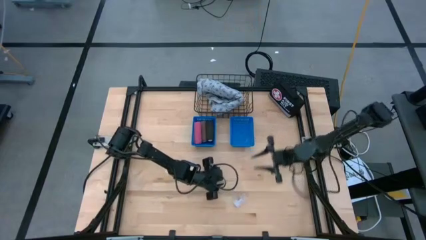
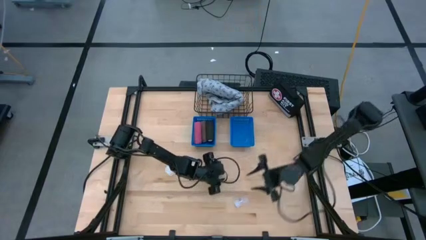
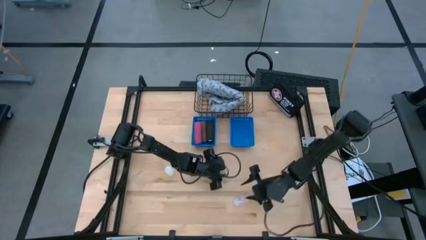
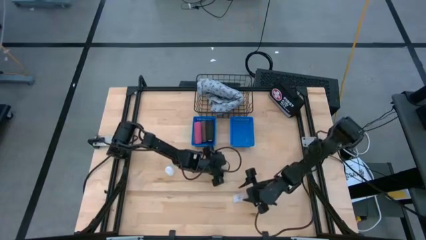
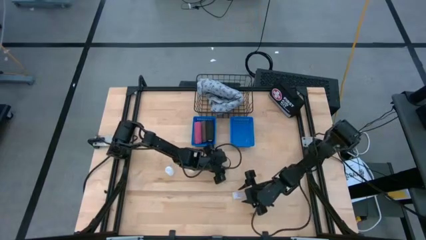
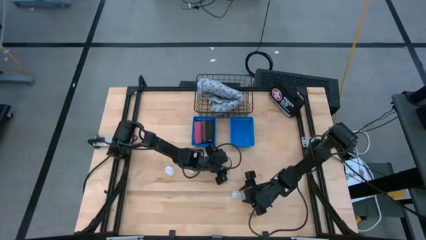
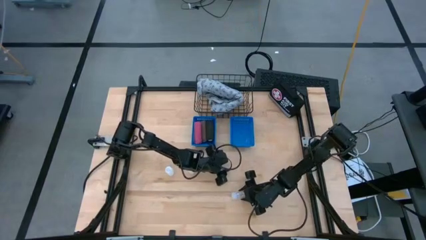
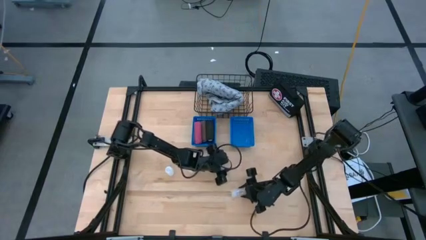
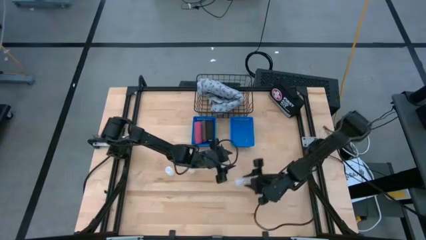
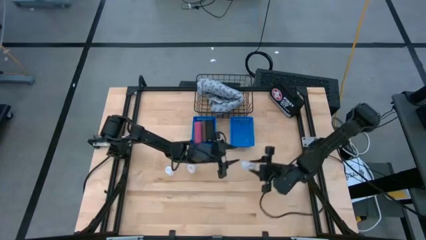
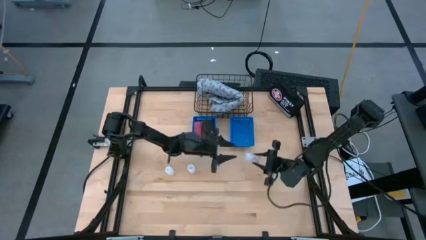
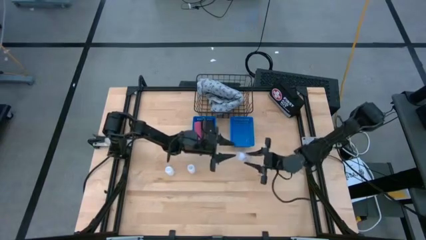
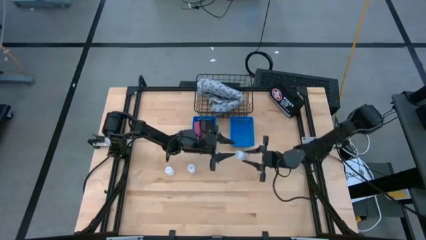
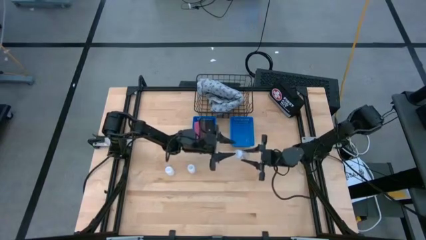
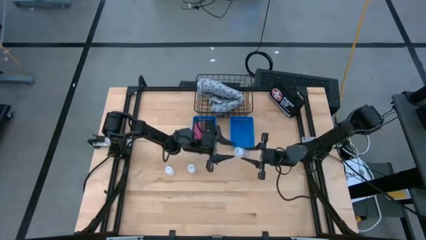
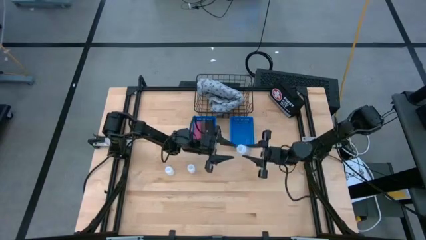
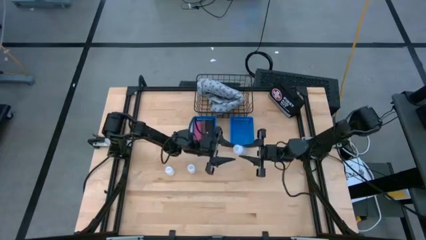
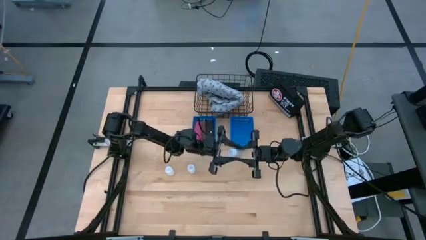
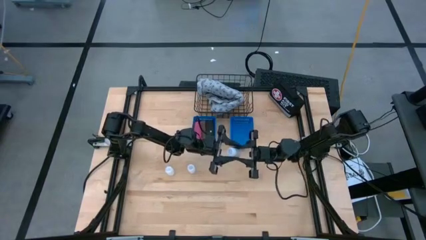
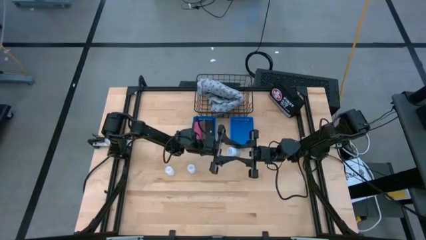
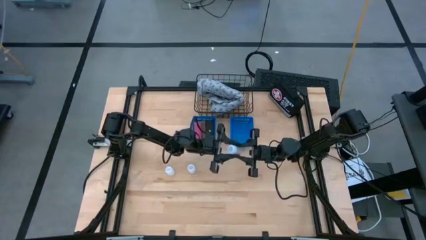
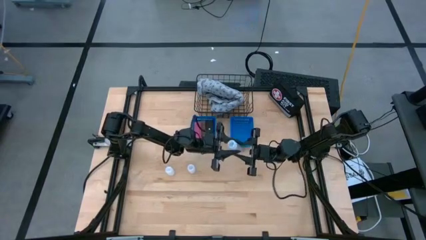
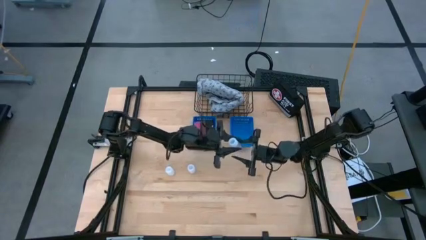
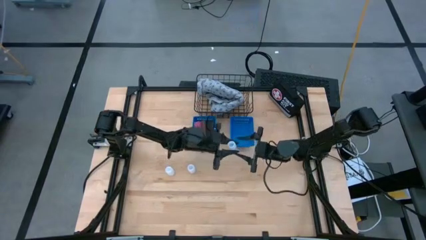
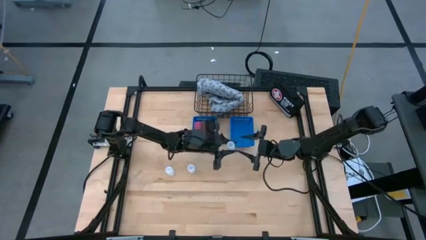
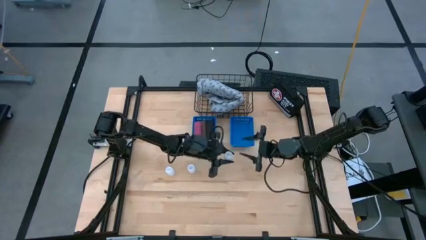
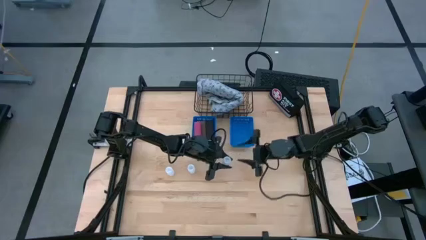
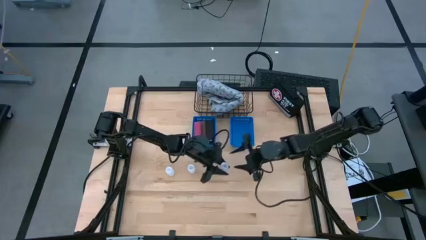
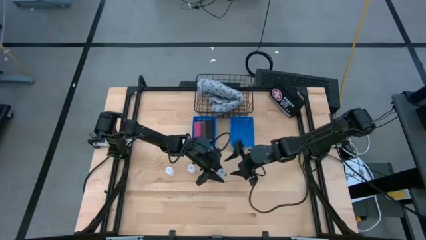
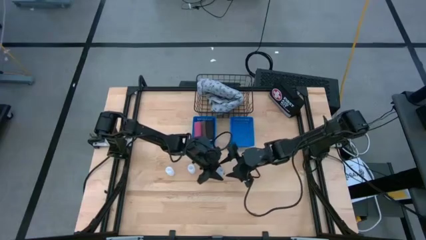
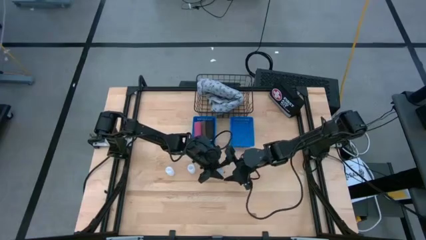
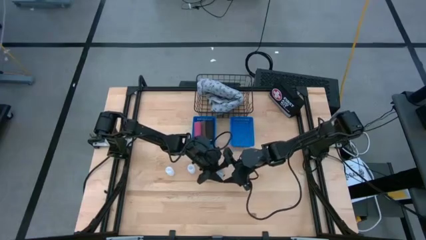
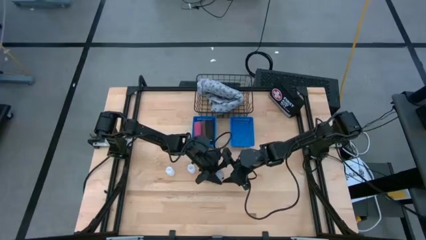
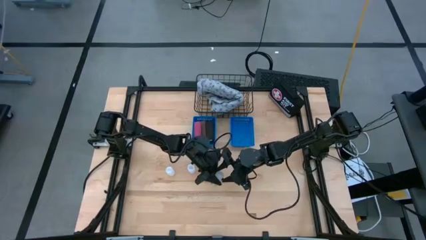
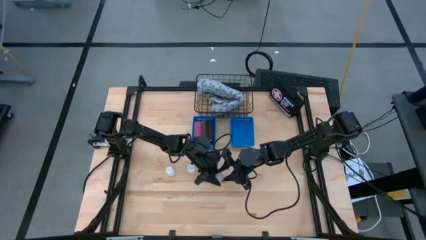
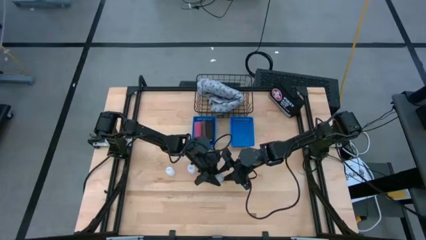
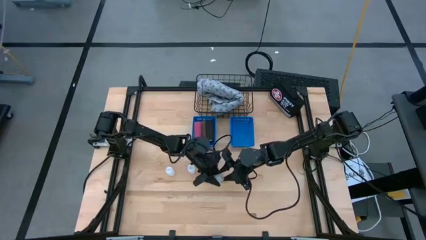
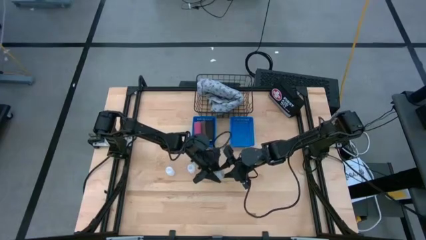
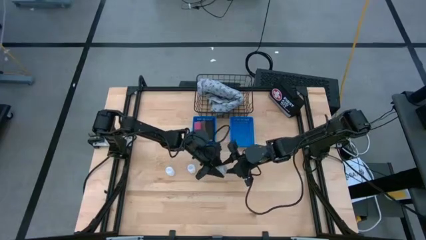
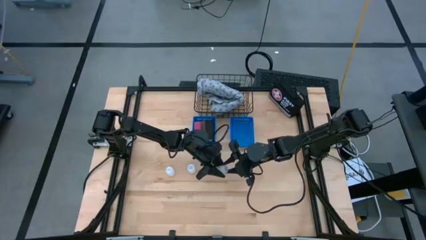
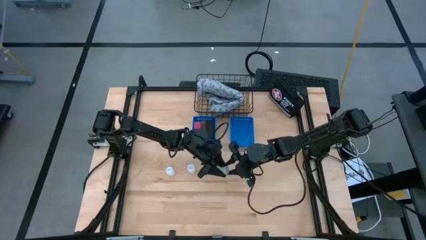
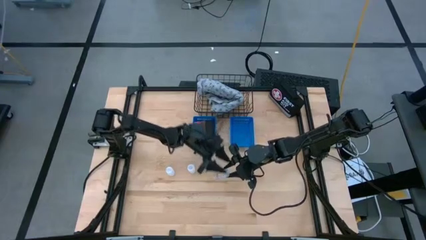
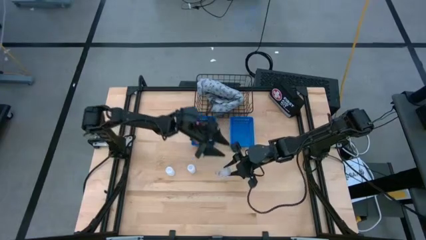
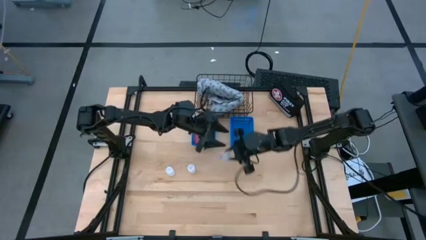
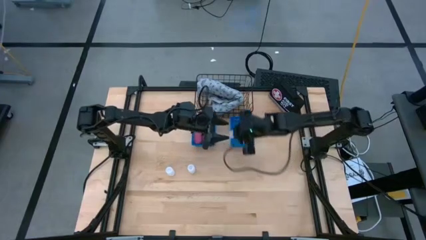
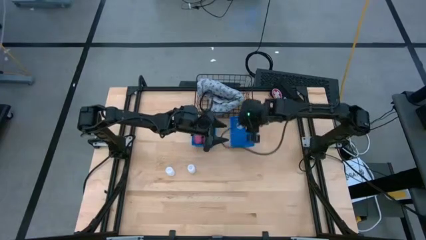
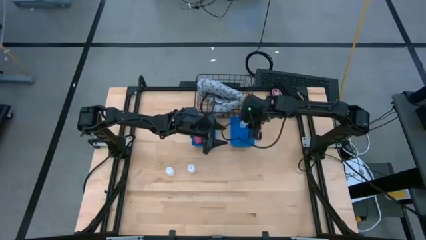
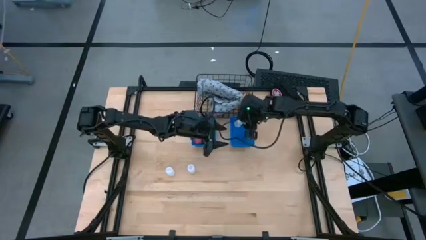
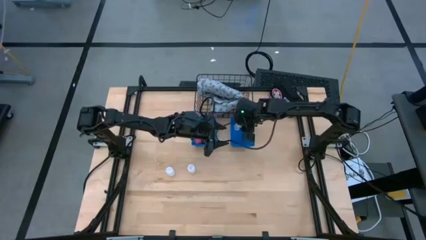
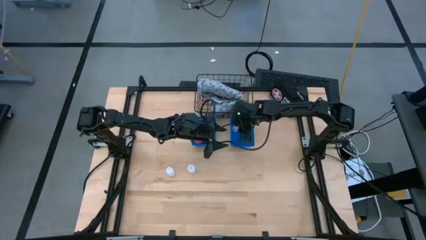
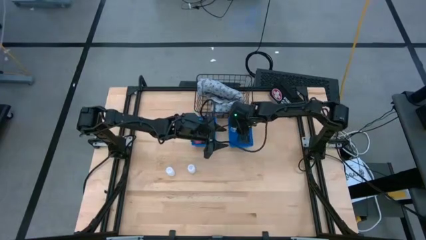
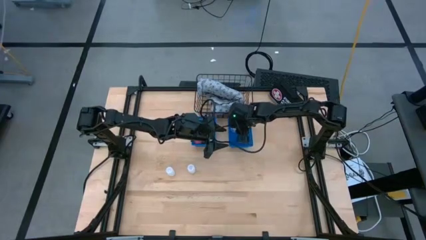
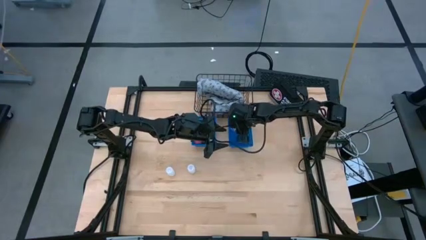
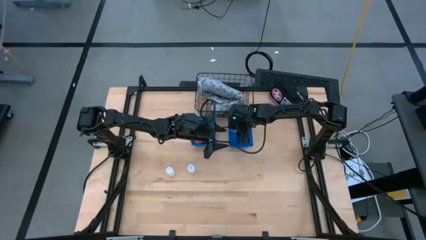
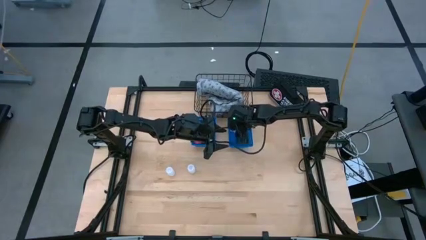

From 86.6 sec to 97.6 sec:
Task: Pick & Place Medicine items
Put the bottom white pill bottle into the right blue bin

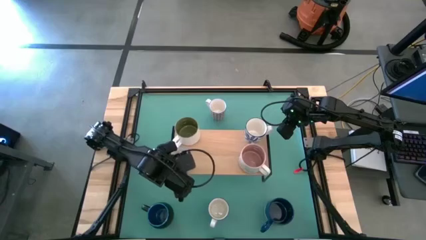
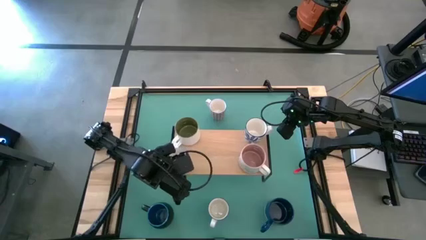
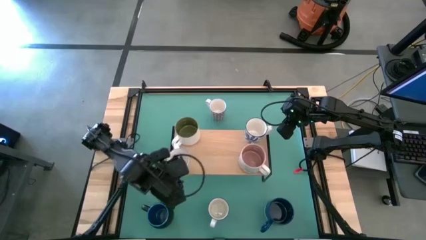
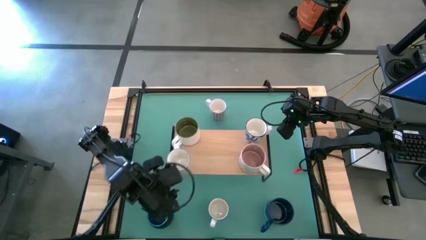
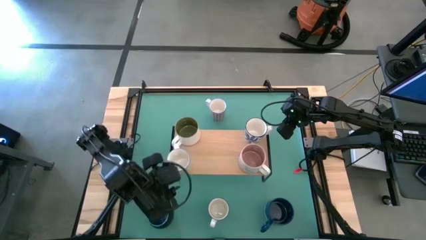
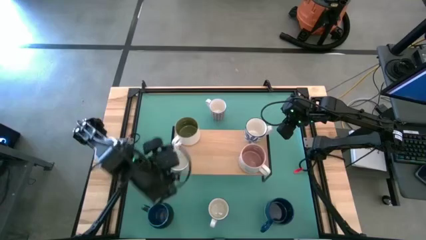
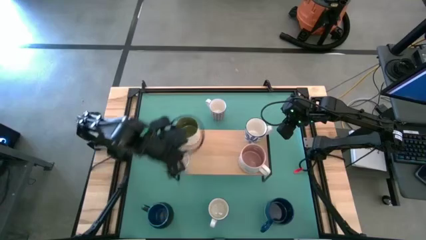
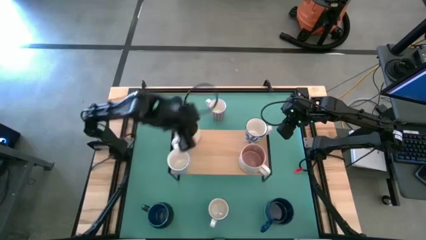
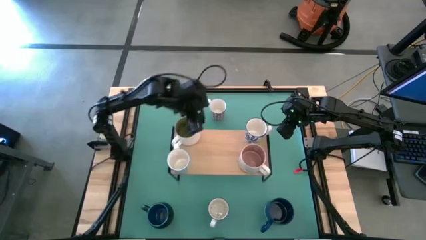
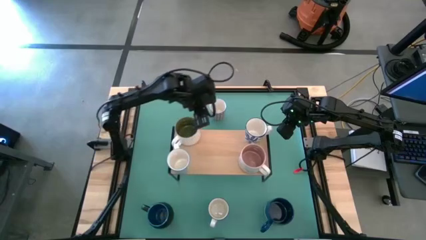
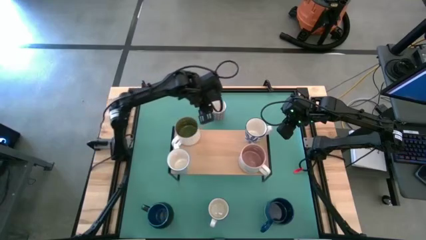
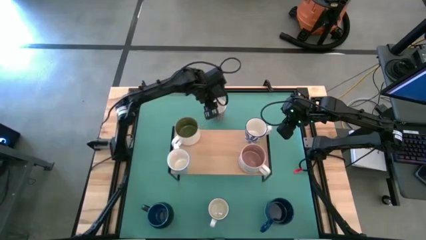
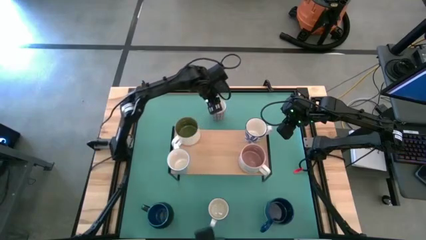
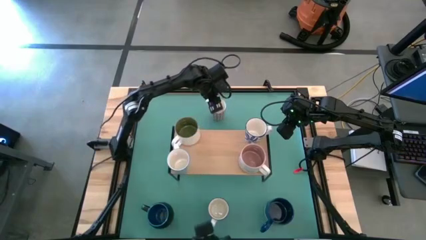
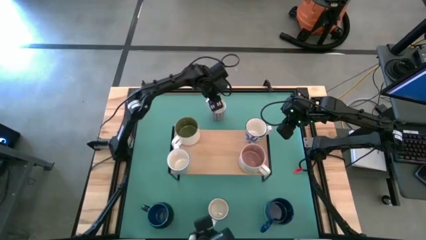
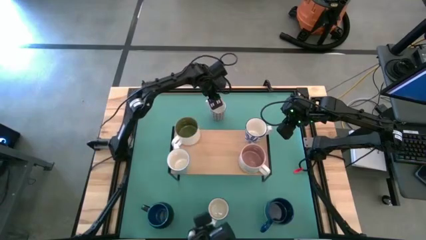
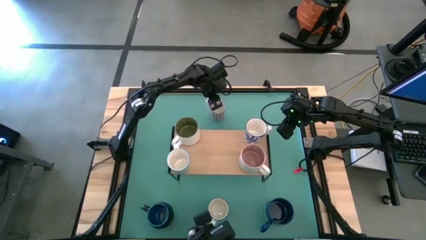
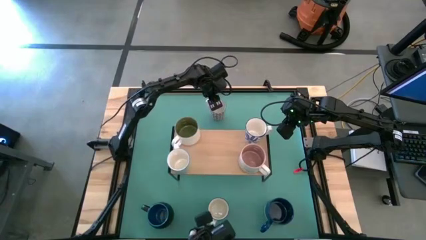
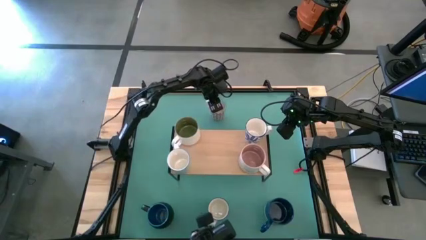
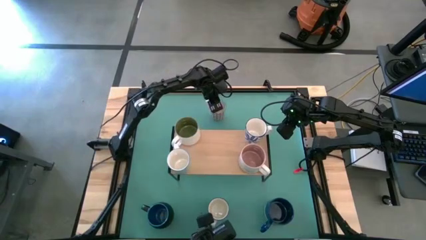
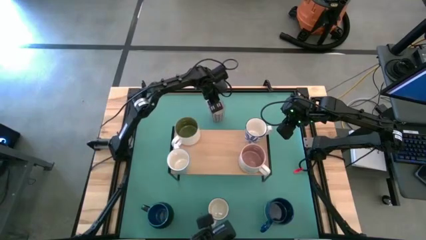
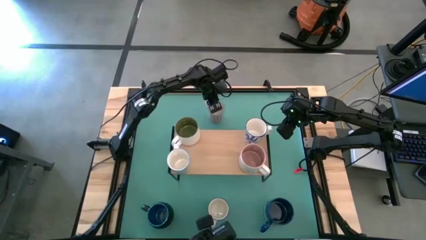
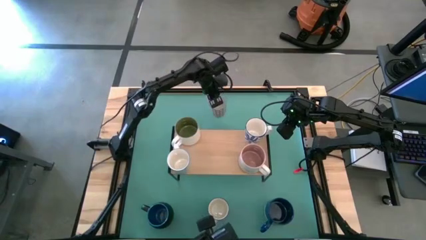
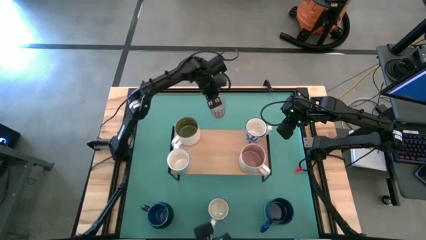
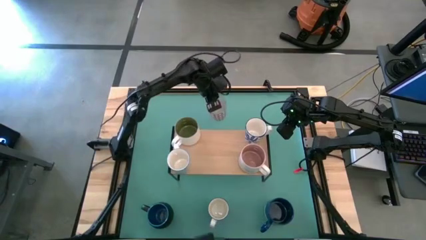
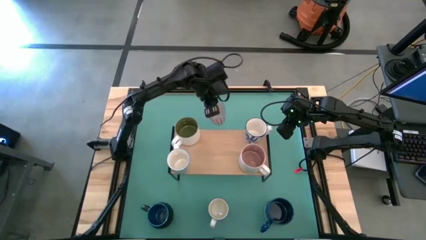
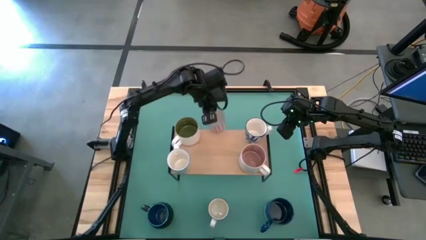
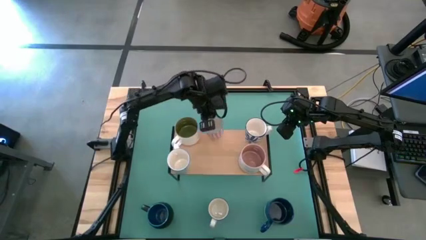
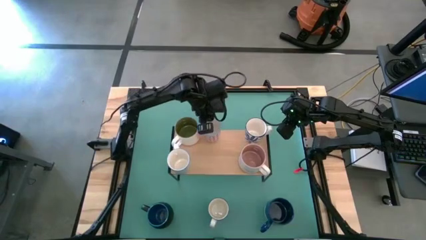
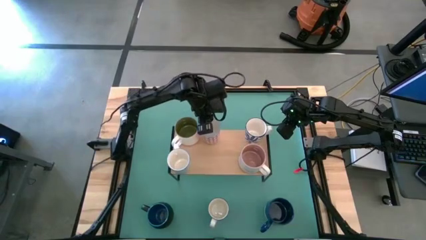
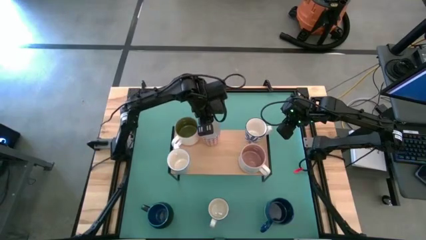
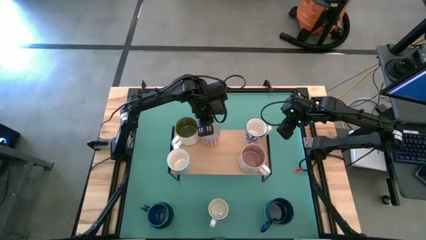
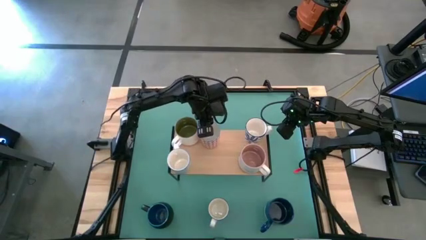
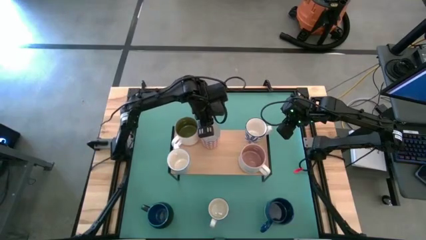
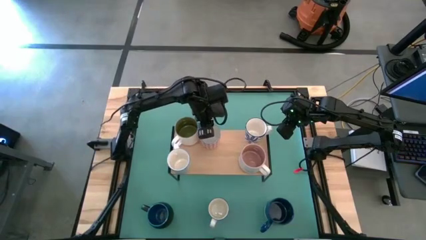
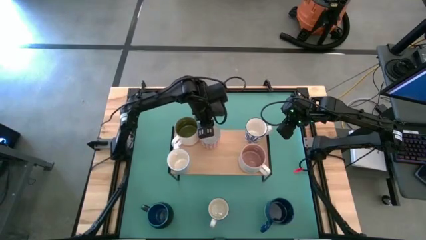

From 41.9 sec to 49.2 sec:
Task: Place coffee mugs
Put the red patterned mug on the shelf
